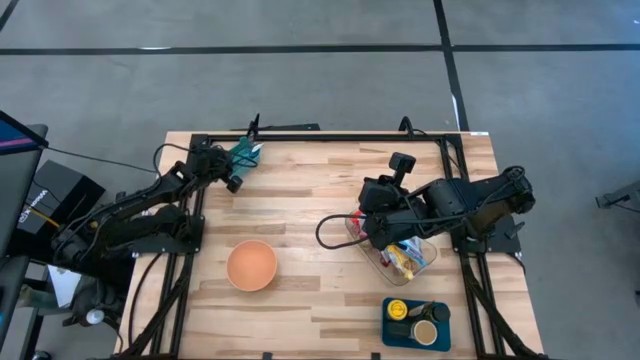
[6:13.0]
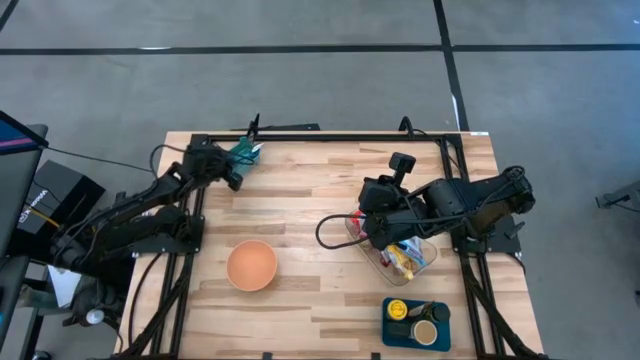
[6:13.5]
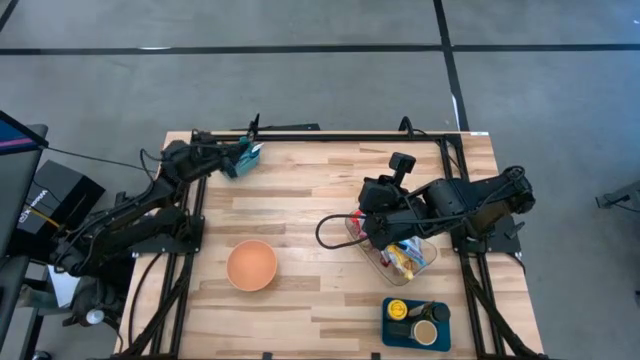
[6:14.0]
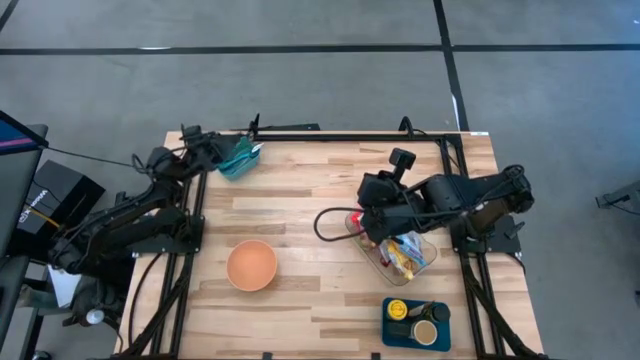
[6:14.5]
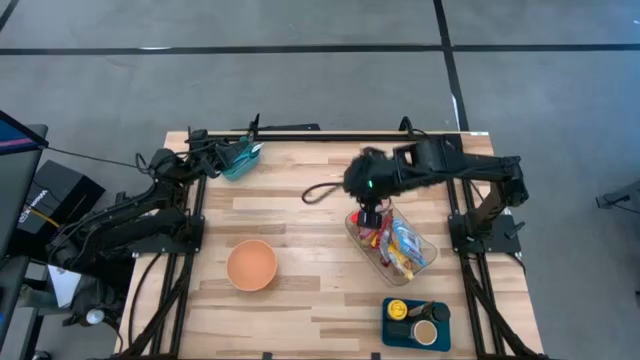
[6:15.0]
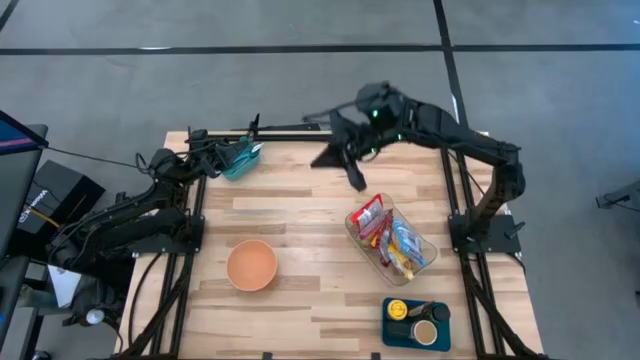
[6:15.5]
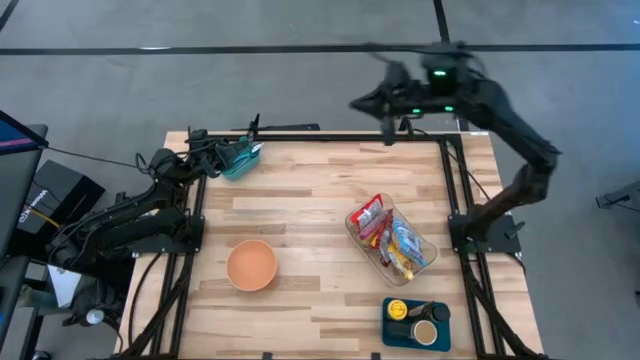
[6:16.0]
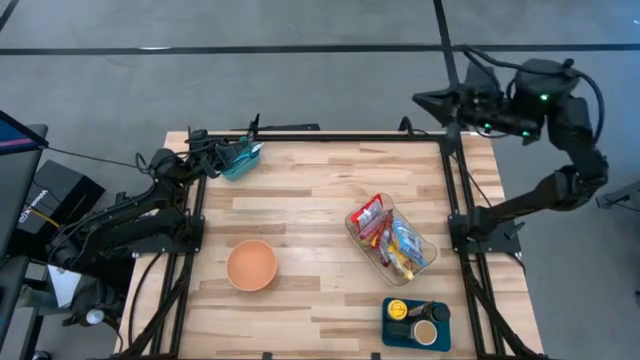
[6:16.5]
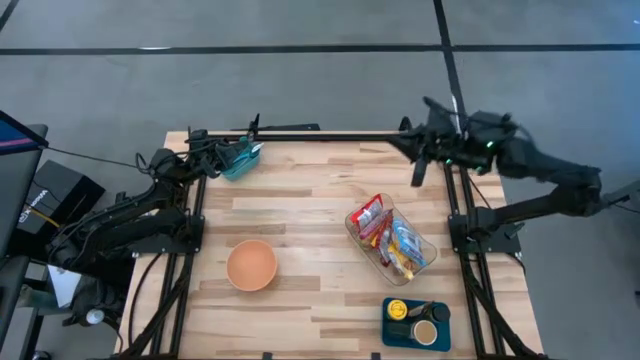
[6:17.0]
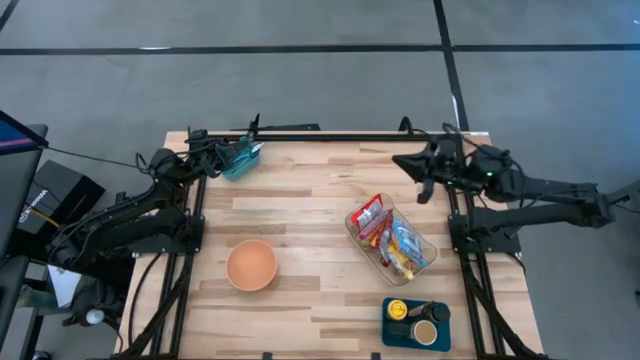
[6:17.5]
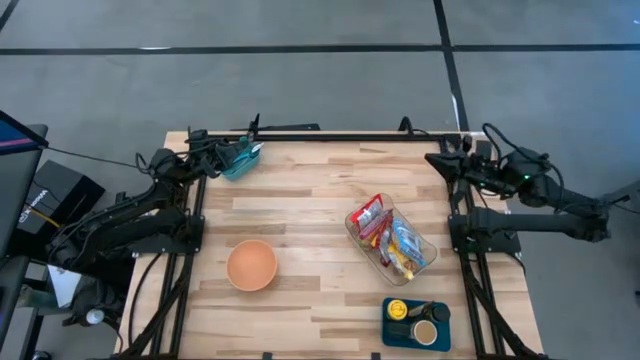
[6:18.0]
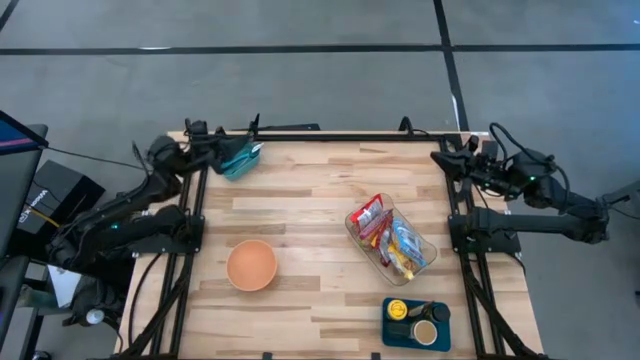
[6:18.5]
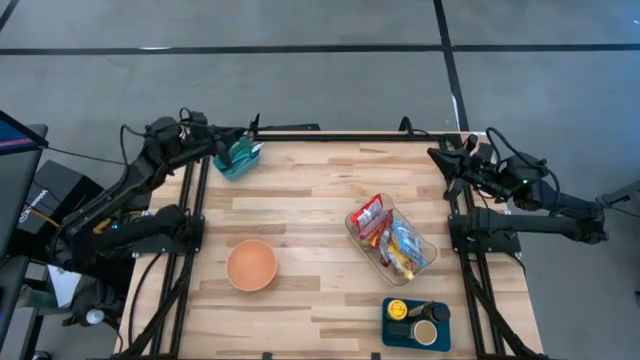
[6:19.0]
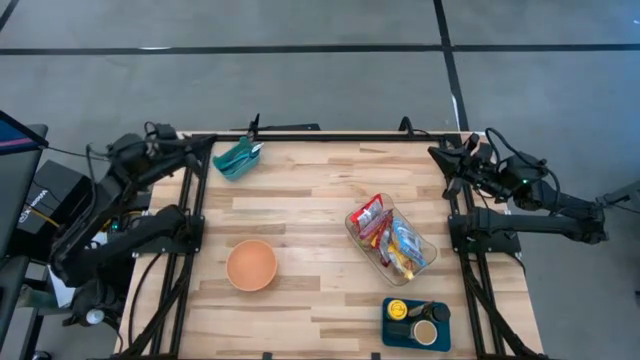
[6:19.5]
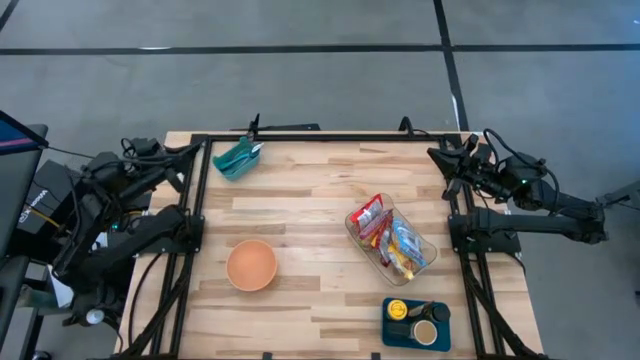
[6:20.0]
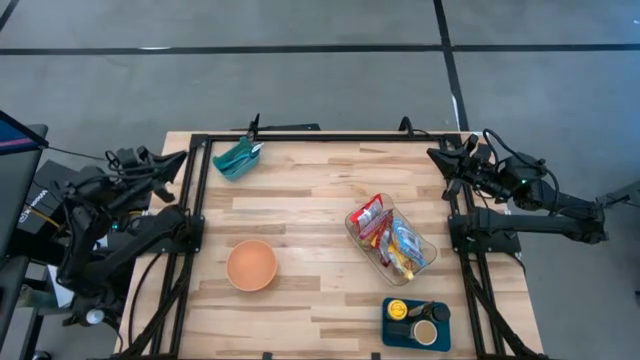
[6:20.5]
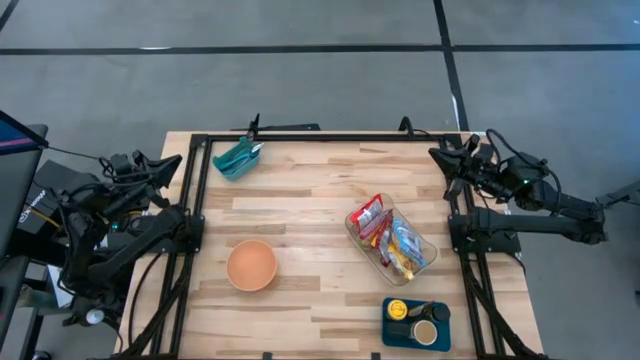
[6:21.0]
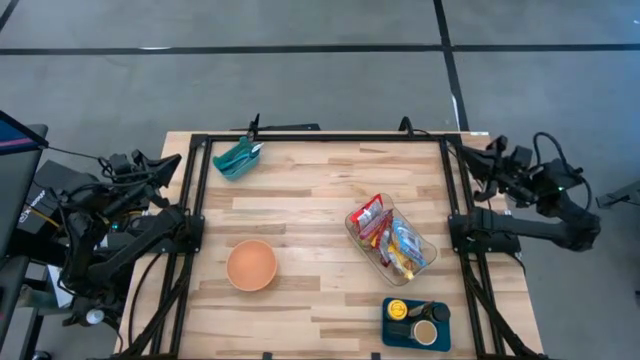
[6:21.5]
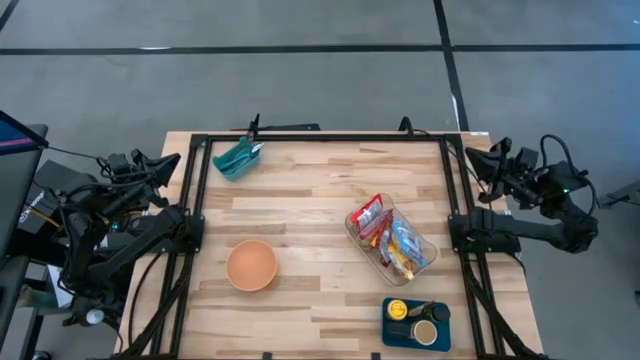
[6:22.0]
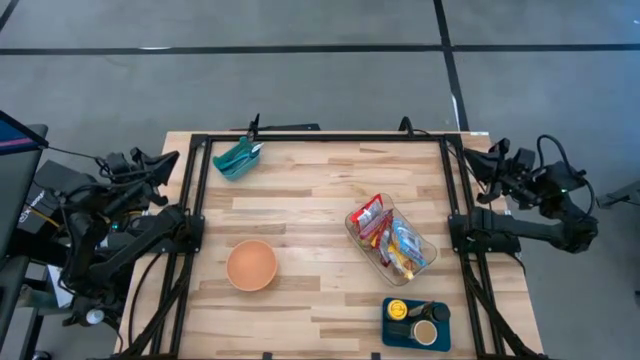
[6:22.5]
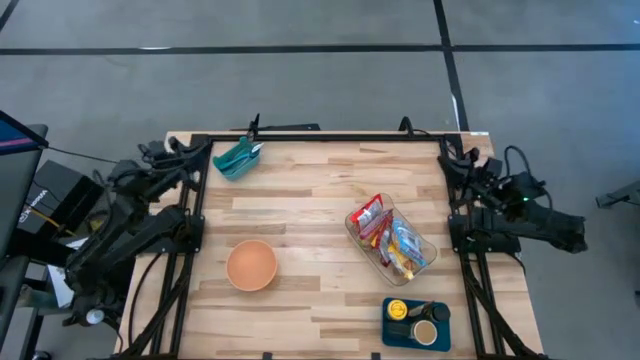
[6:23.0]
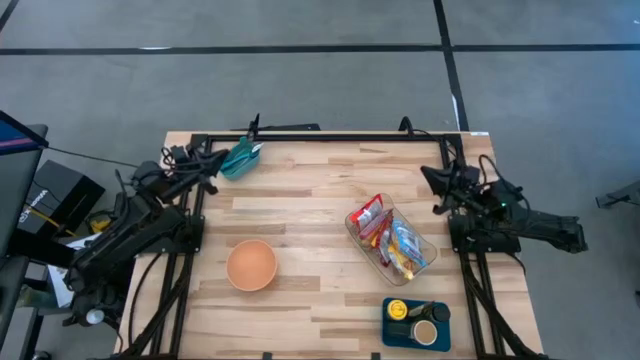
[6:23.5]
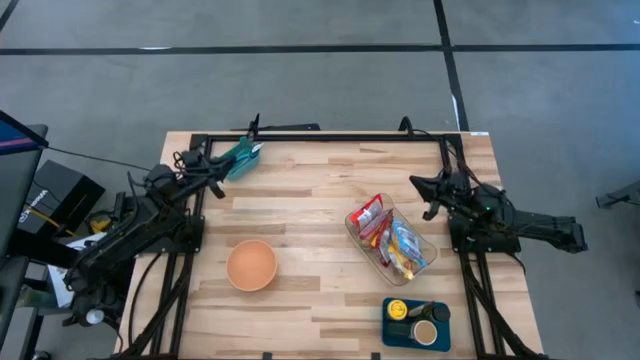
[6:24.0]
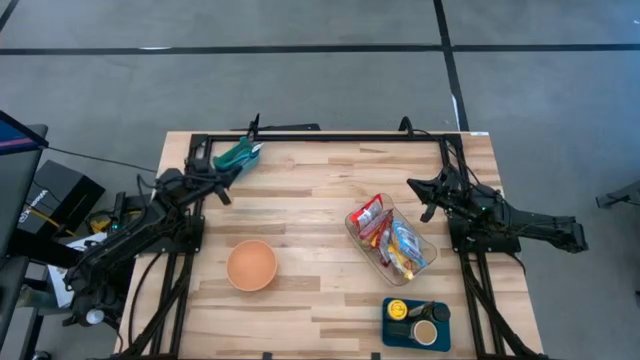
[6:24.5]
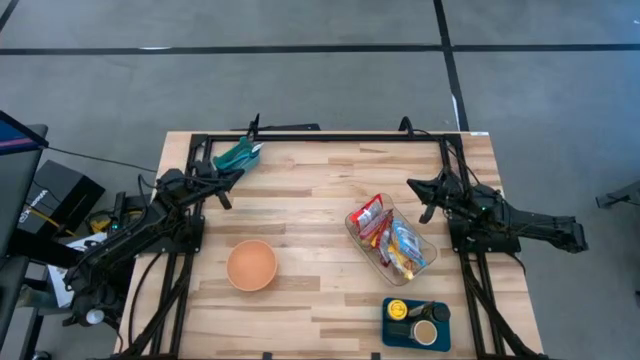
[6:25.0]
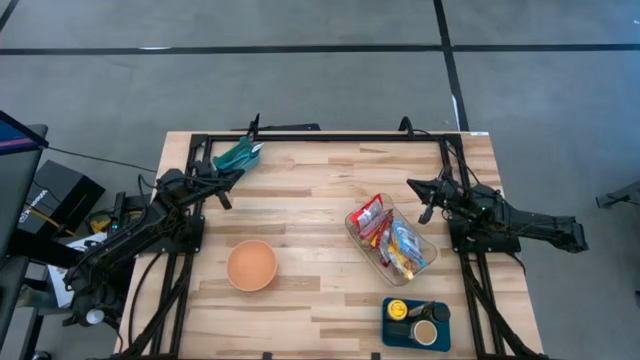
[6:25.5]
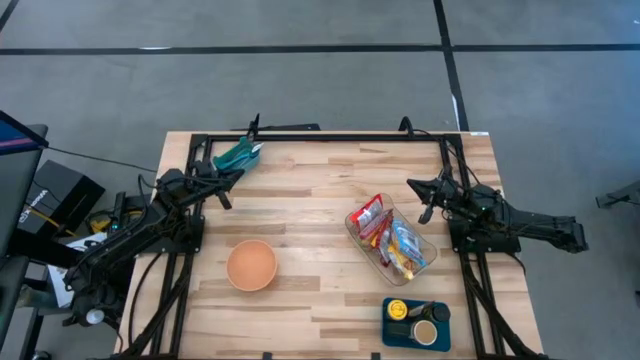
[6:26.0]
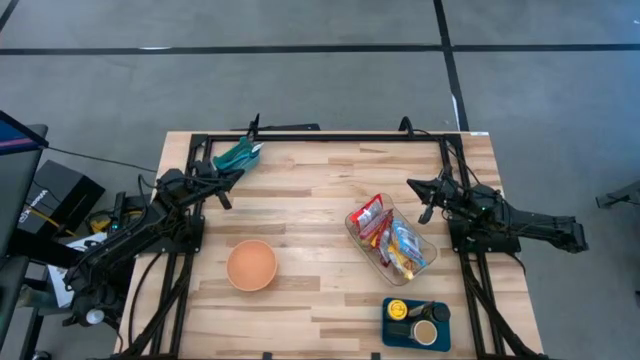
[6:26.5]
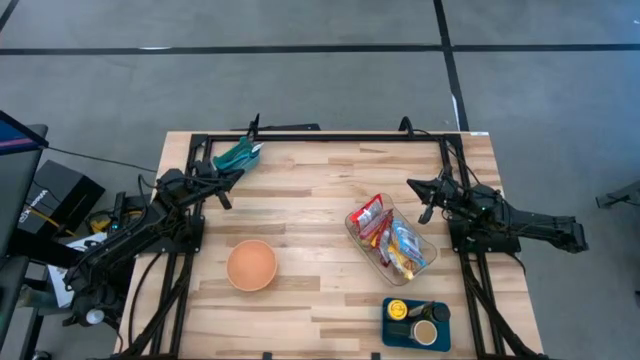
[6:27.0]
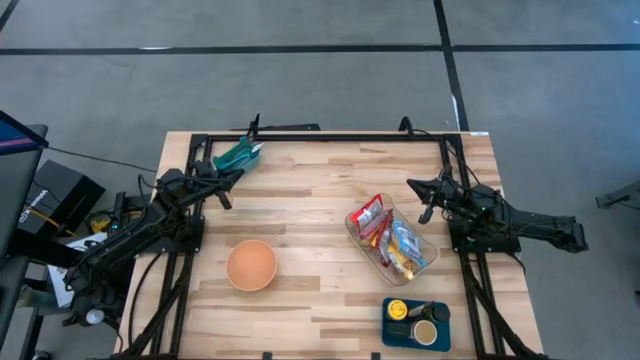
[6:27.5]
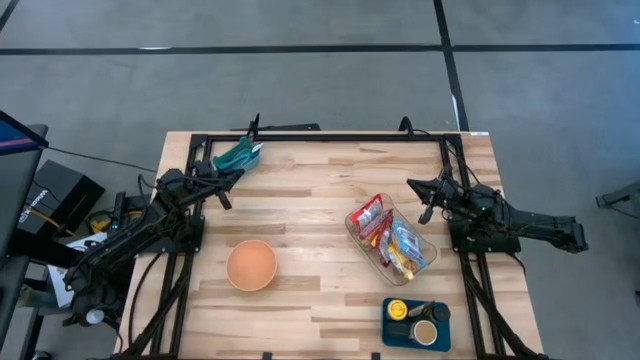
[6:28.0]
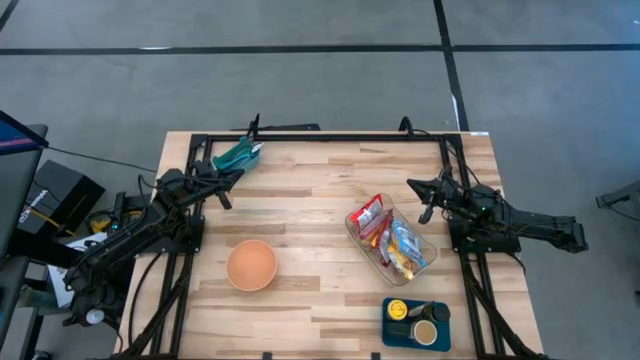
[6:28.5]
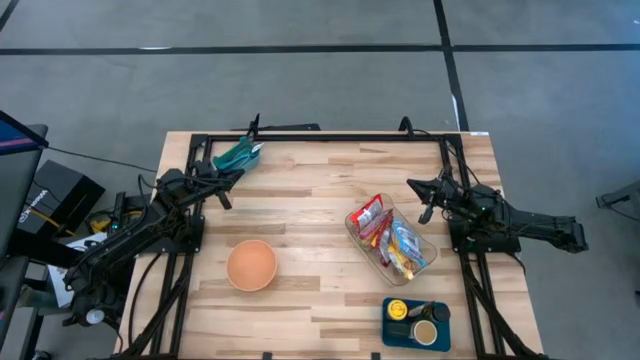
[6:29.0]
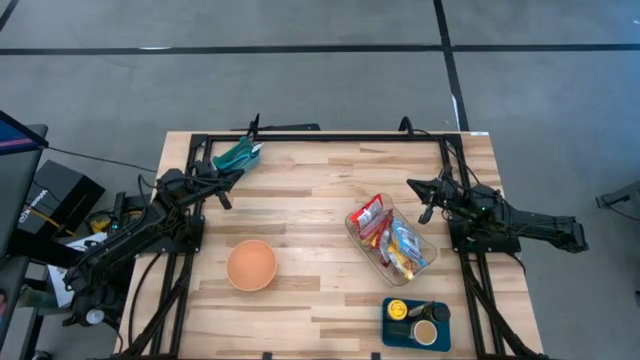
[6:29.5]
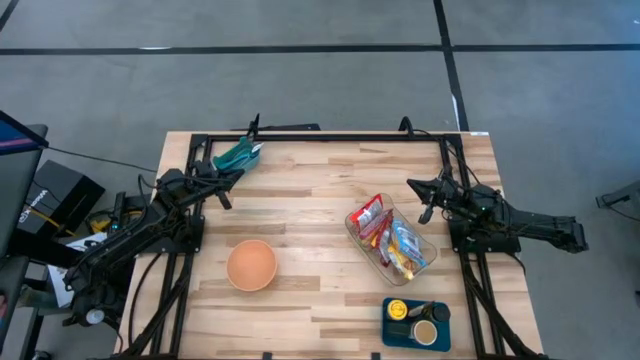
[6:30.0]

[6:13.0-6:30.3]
Task: Pick & Place Food Item
Return to Home Position

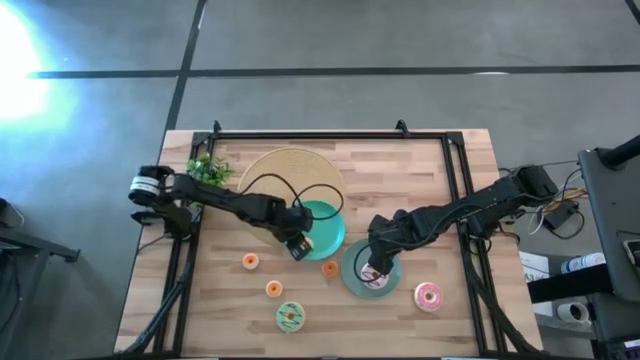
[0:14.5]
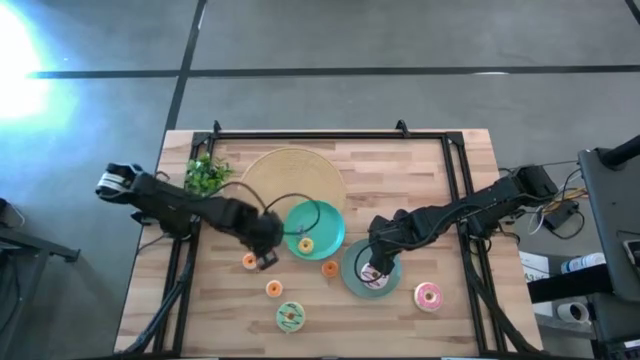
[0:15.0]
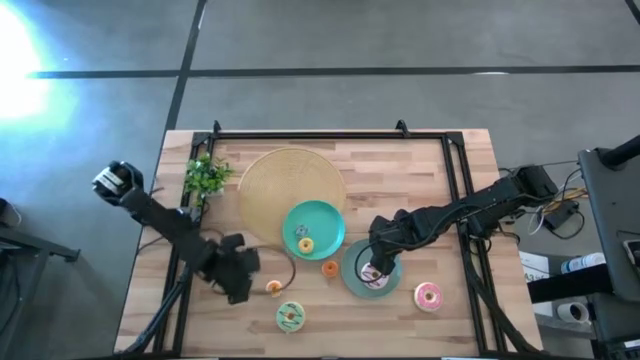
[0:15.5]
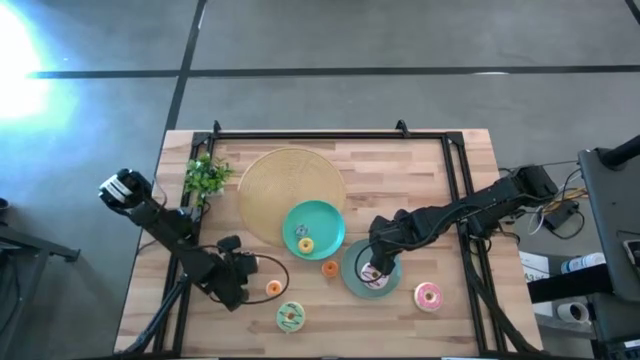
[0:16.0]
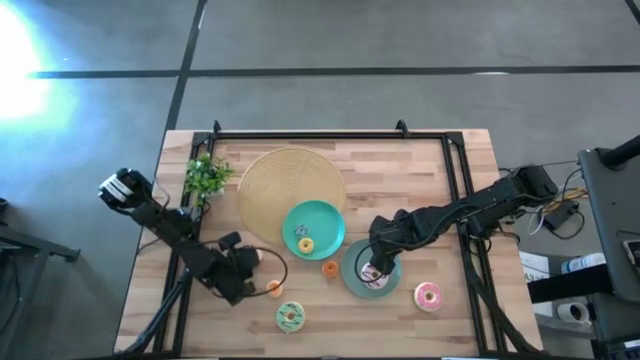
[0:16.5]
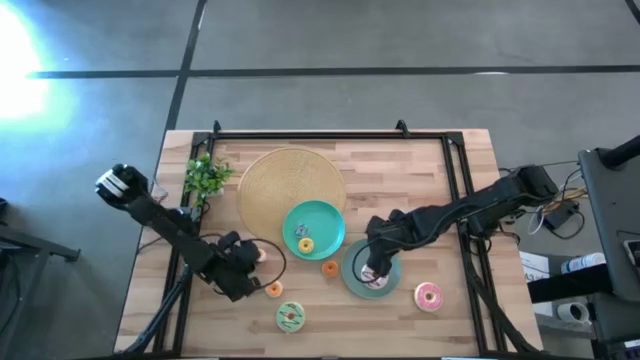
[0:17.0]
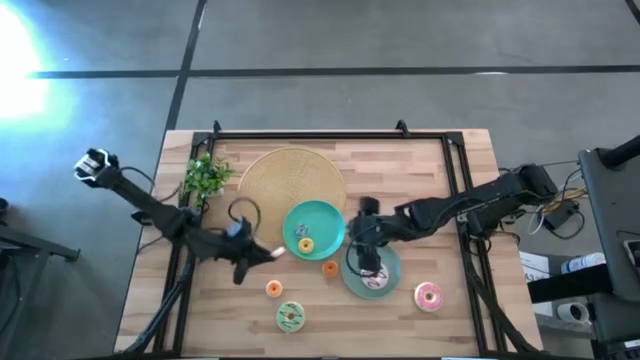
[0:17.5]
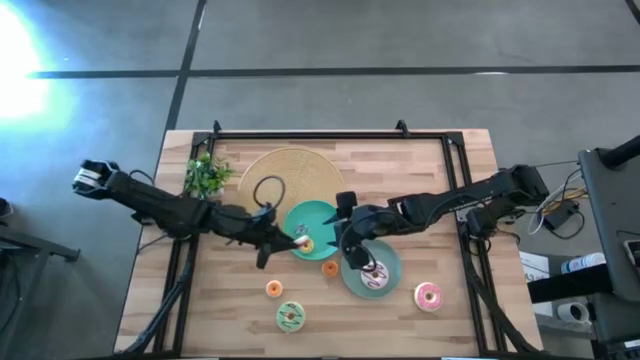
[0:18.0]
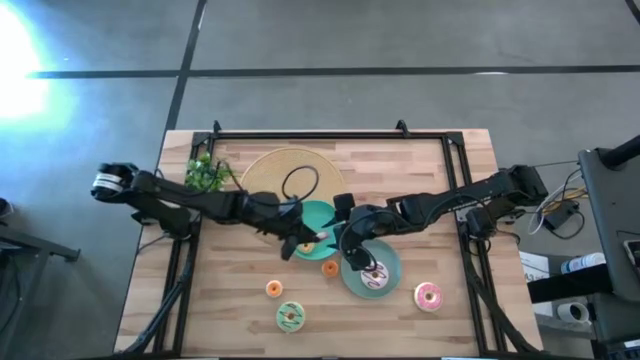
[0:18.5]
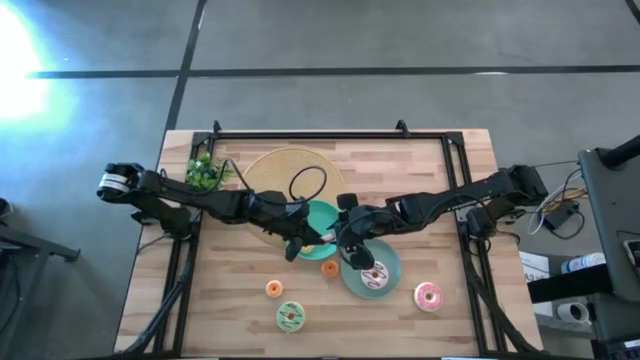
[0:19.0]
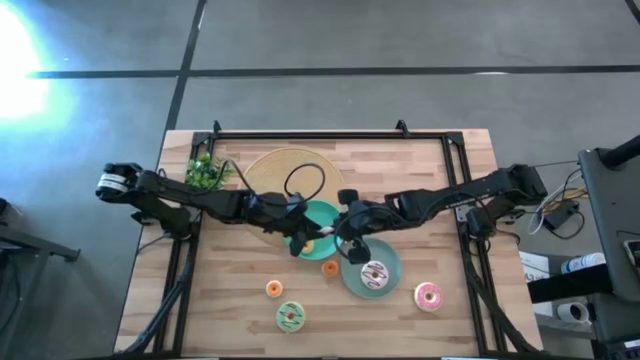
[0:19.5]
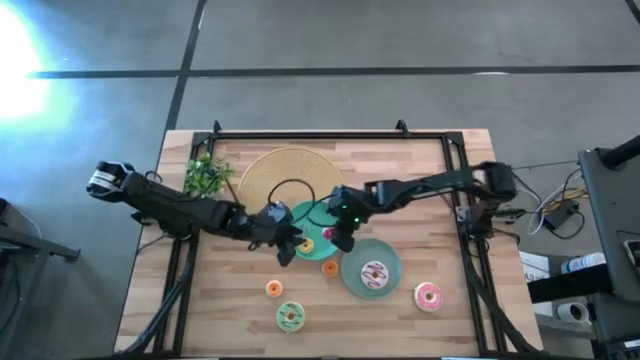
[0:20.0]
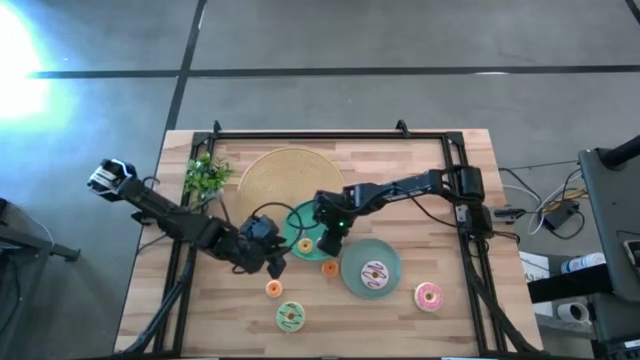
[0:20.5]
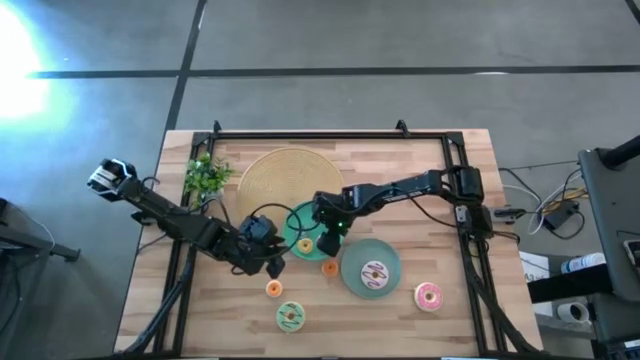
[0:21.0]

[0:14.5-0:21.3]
Task: Pick & Place donuts
Put the small red doughnut on the blue plate
